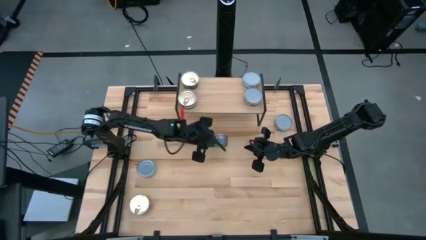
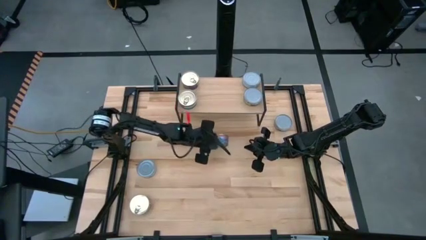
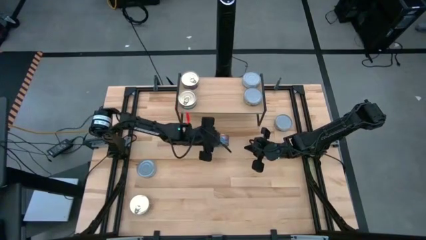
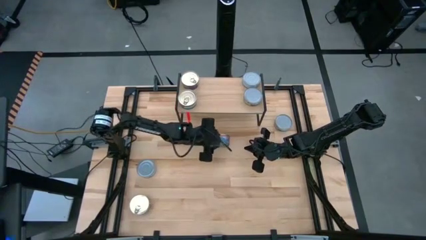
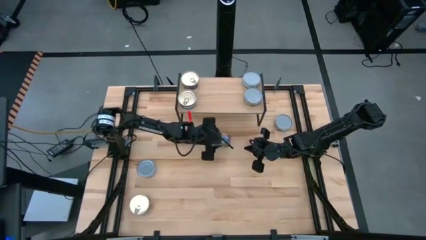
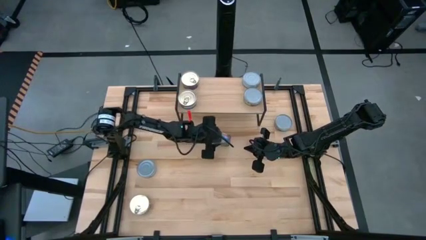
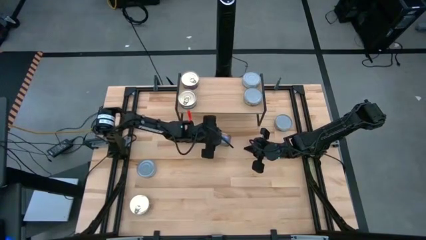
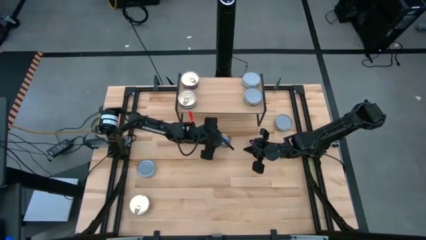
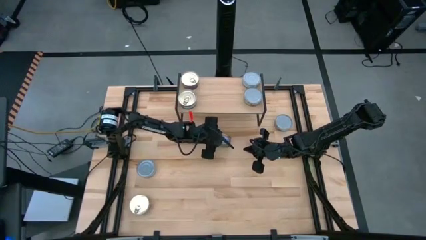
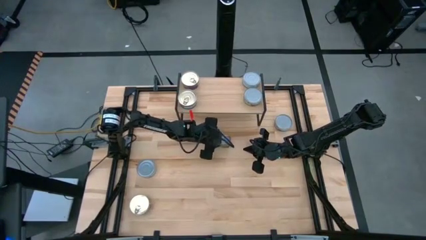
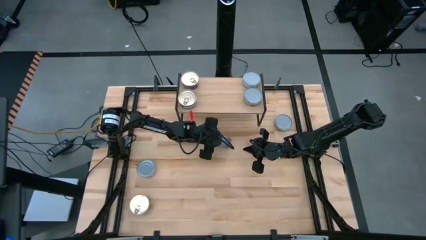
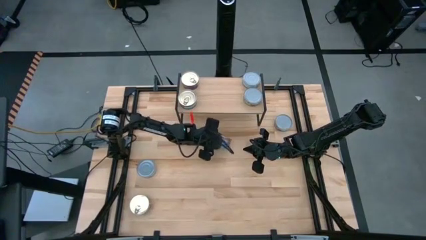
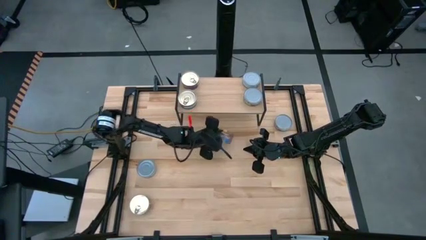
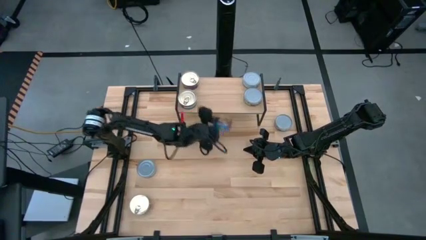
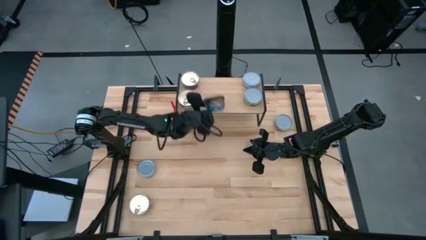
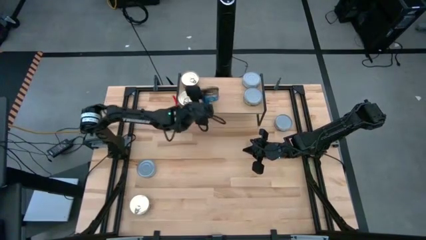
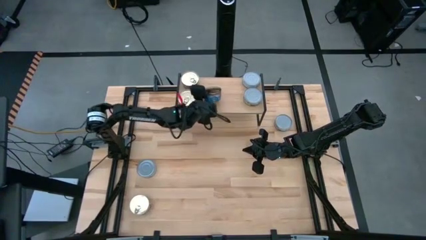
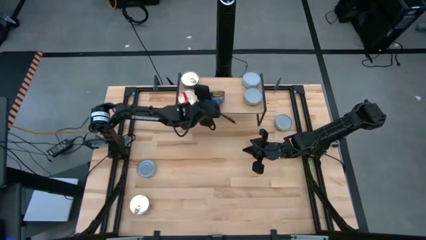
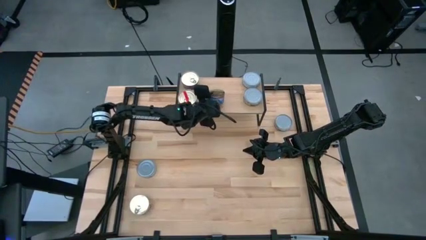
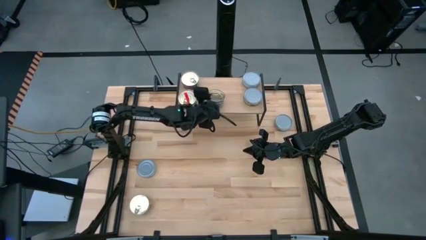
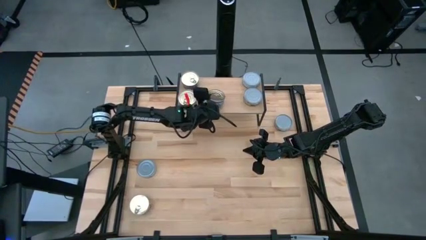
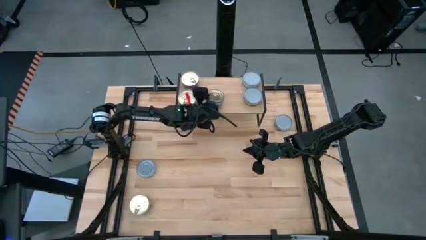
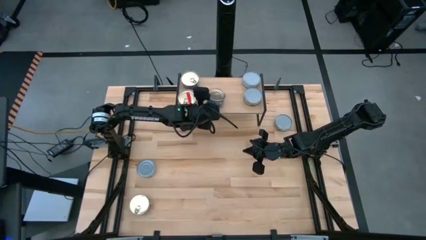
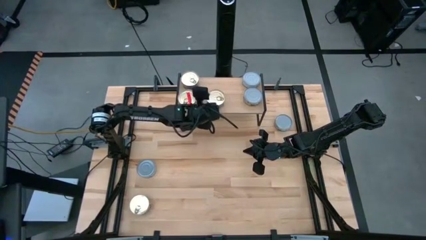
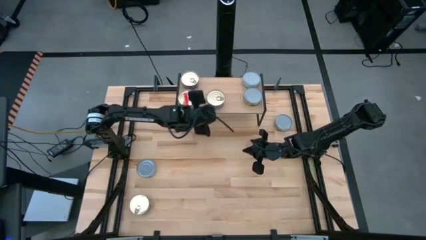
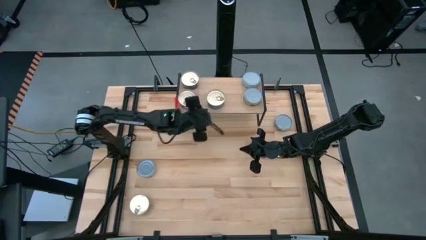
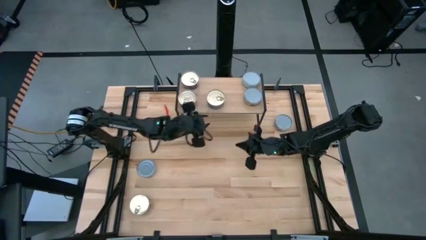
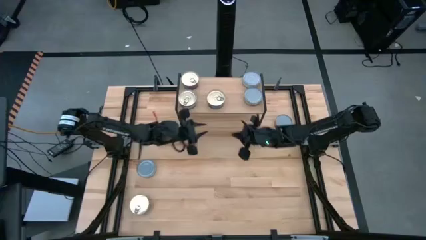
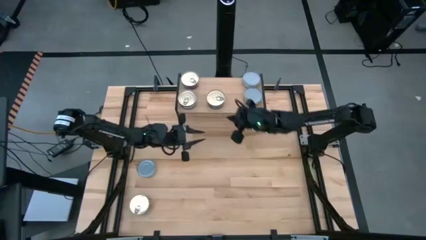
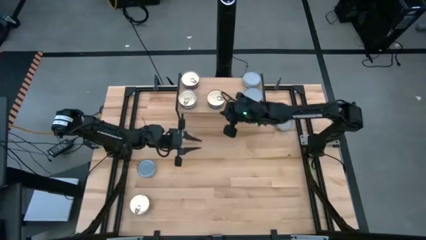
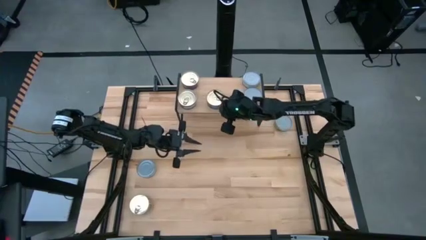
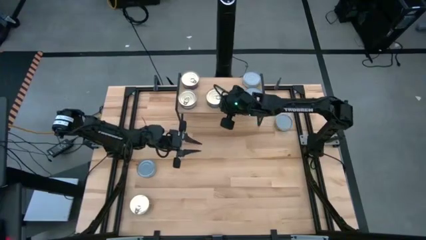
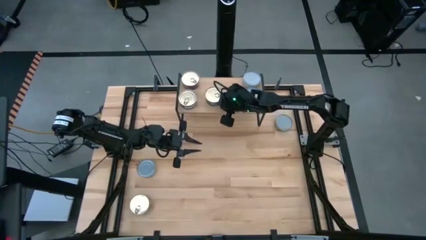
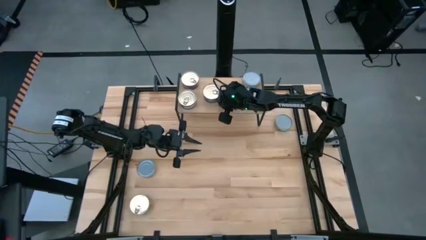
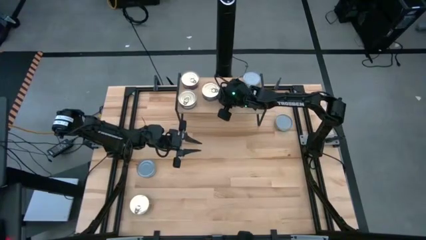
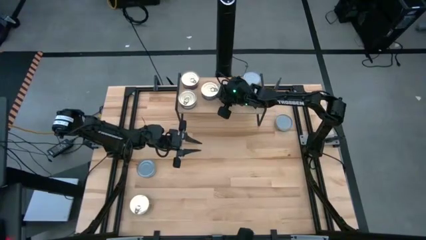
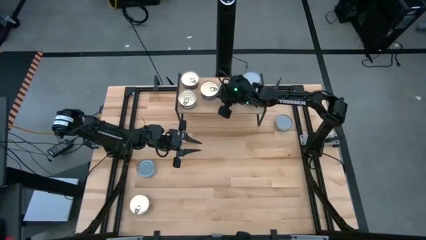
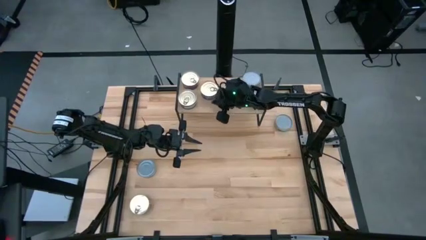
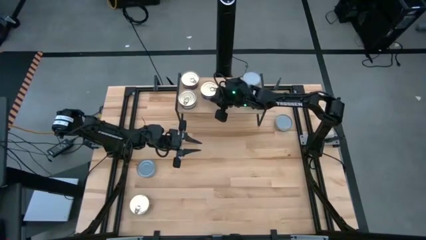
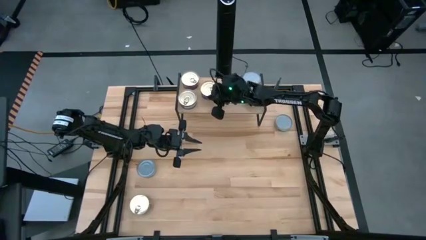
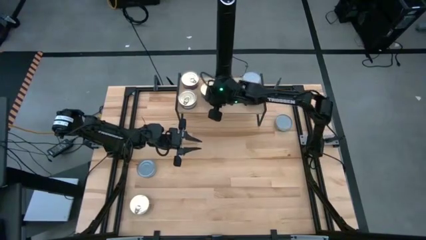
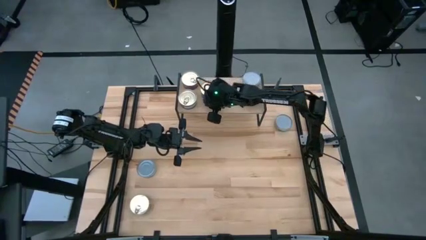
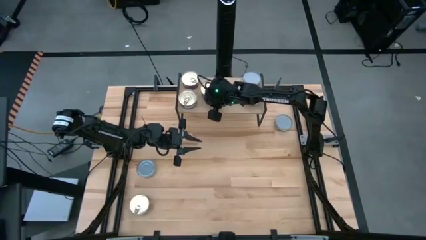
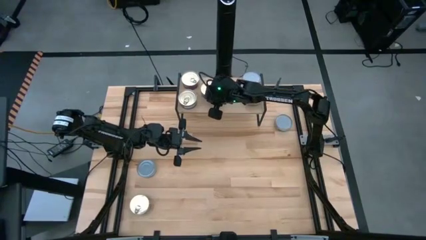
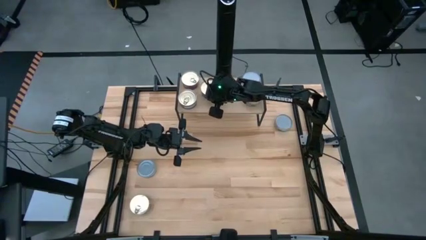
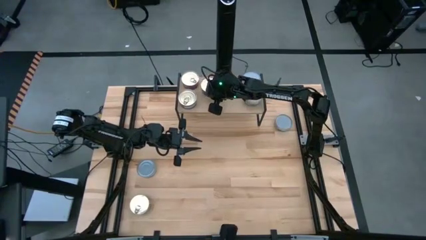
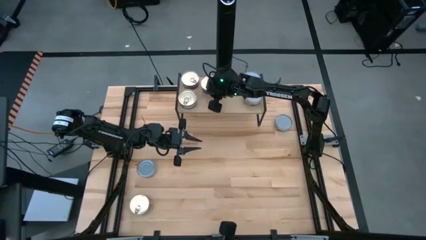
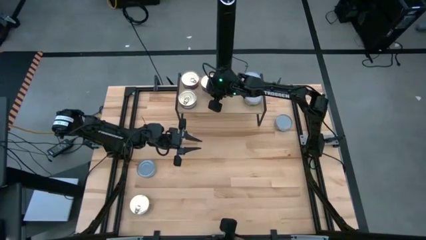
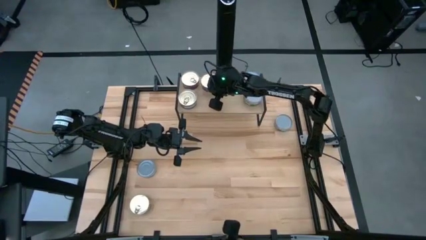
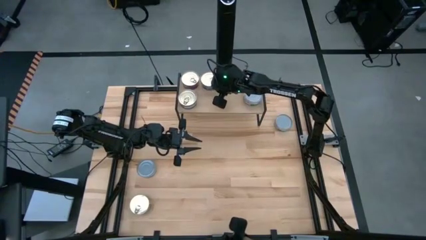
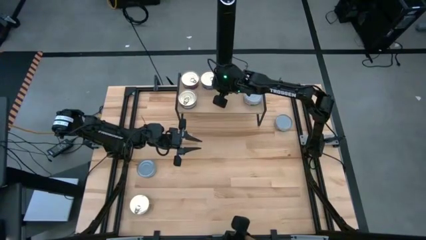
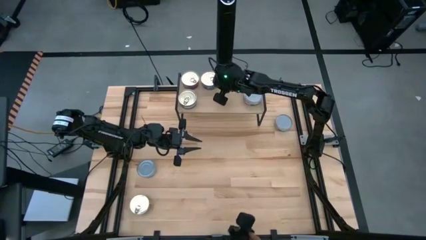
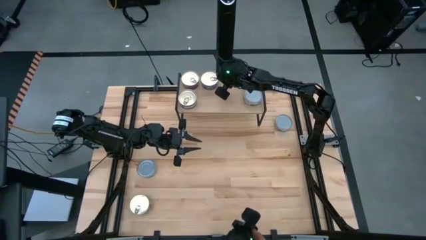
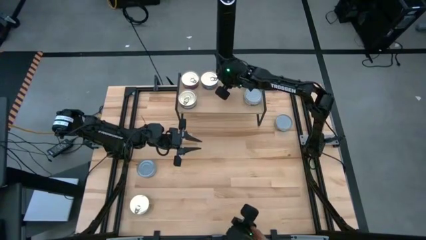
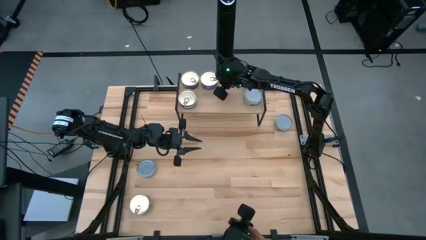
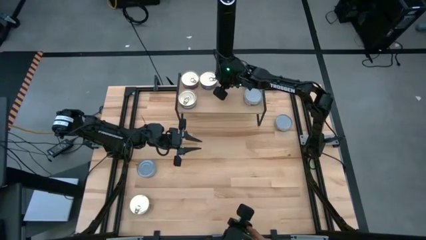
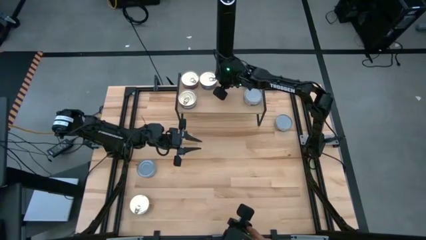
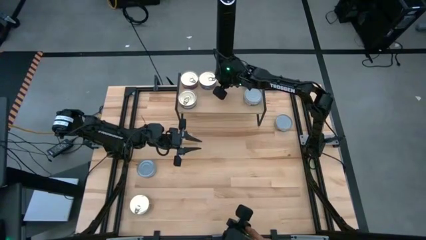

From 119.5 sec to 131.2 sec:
Task: Stack canned seafood by type on shelf
Put the top blue tuna can on the shelf

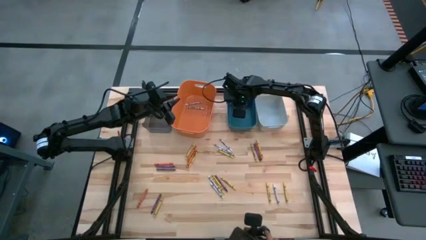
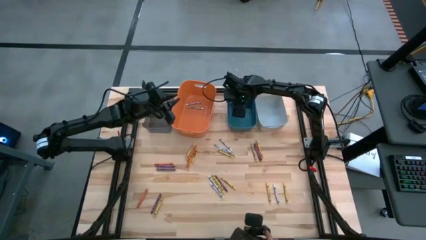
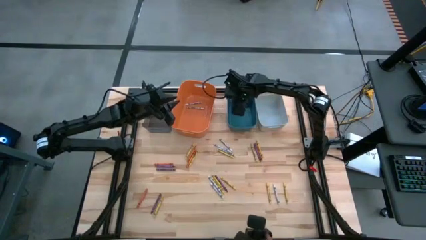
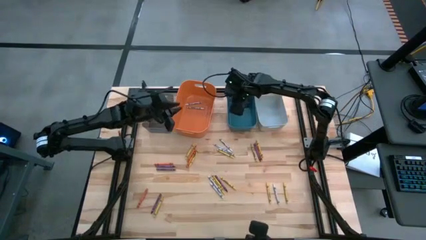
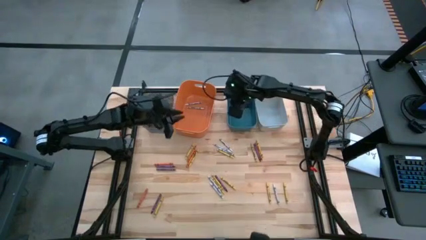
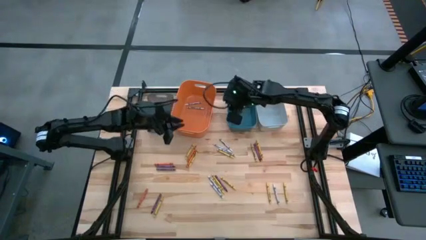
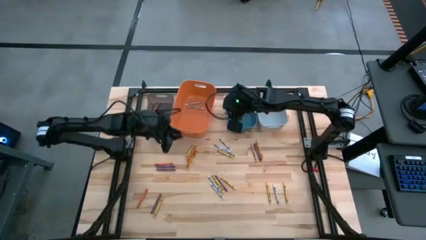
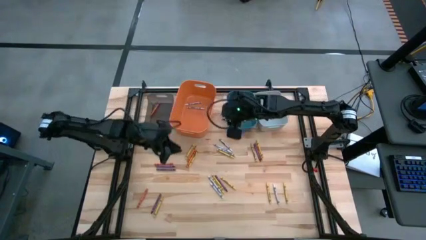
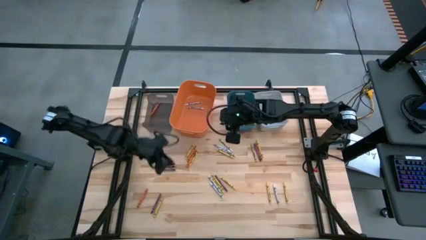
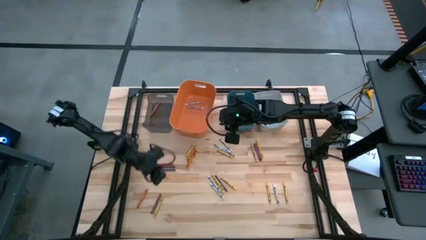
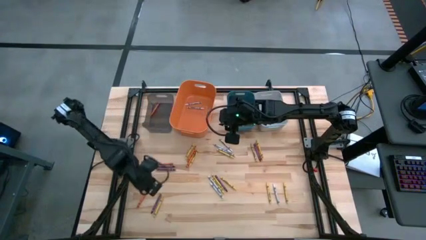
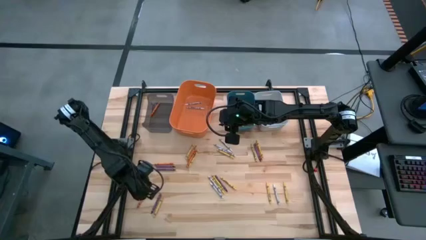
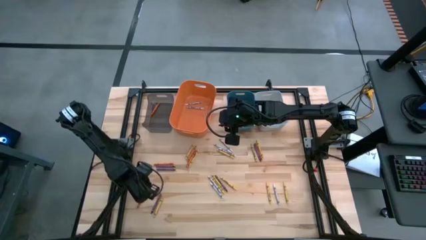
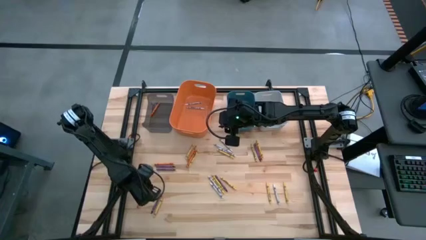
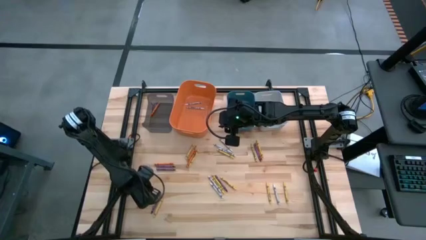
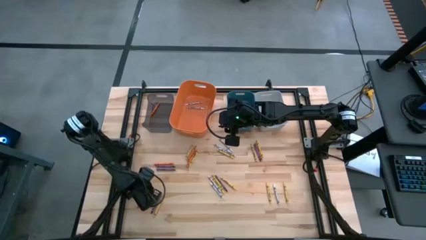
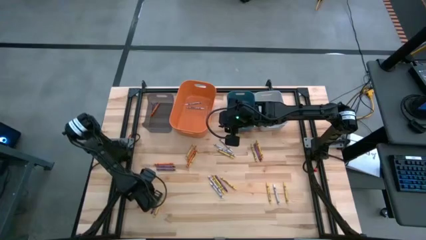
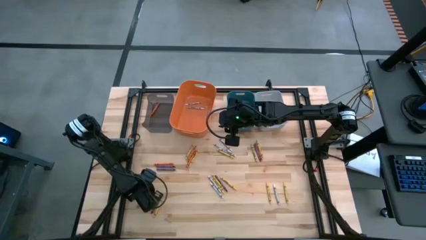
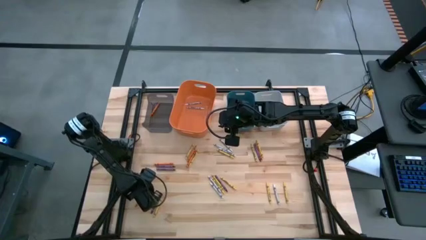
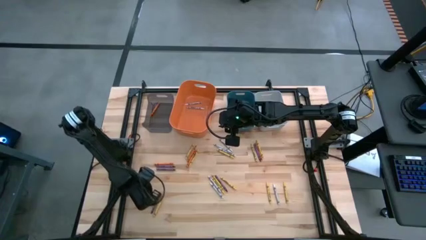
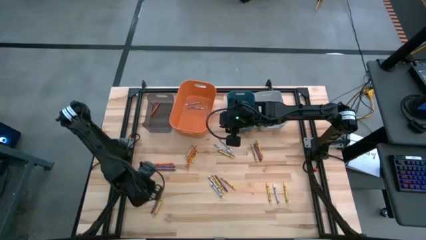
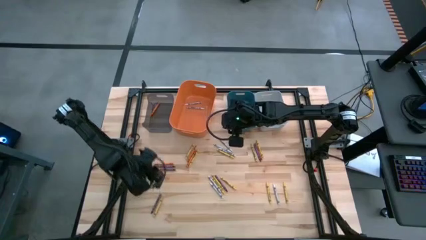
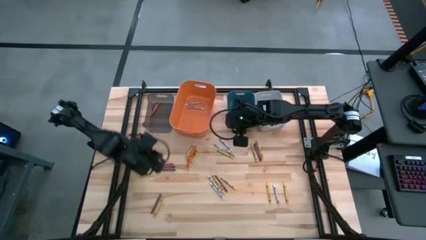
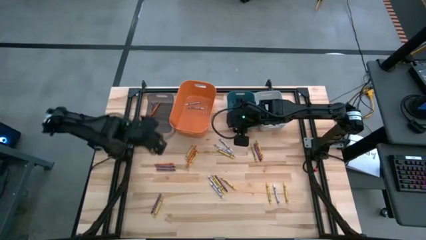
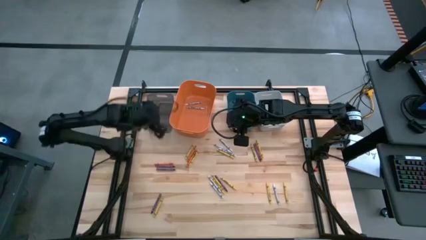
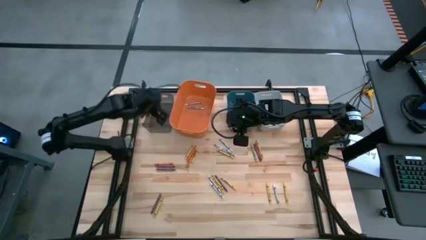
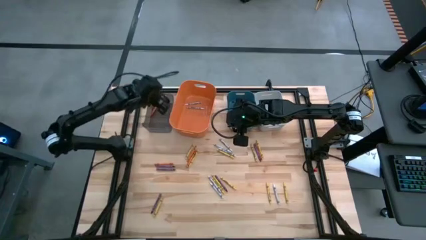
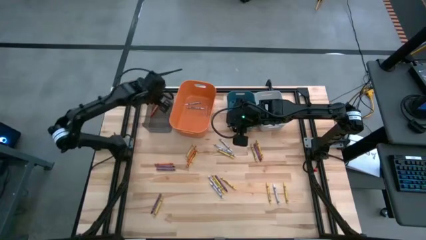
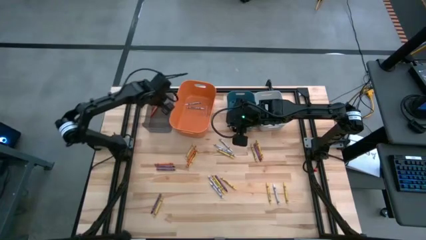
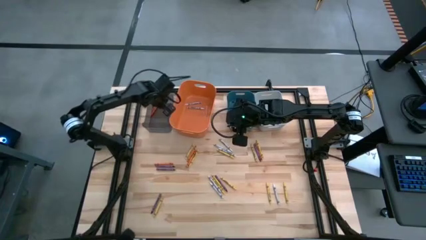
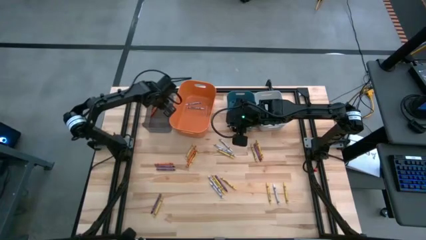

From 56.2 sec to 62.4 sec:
Task: Sort crayons
Put the orange crayon into the black bin
